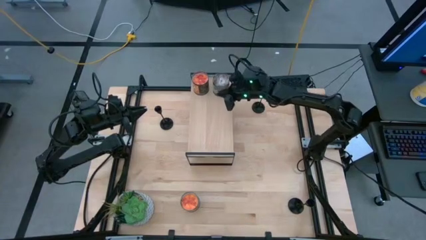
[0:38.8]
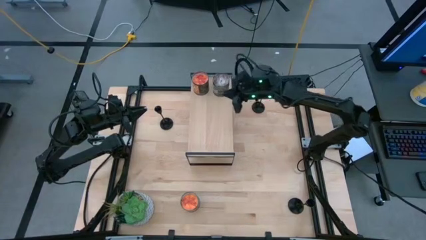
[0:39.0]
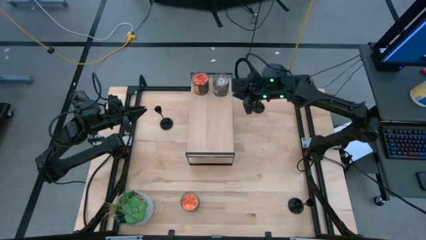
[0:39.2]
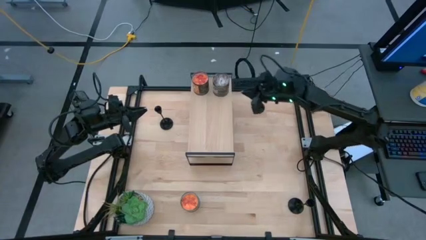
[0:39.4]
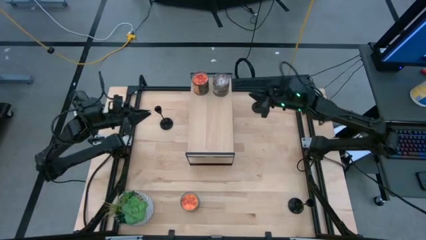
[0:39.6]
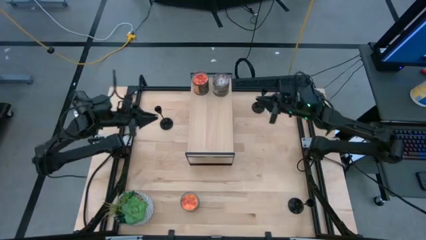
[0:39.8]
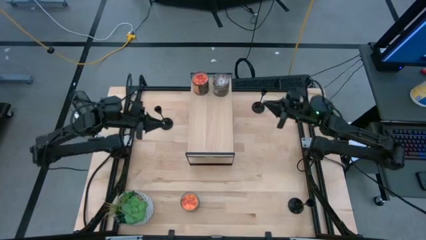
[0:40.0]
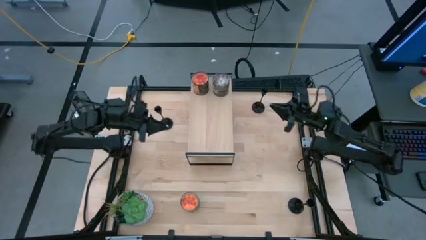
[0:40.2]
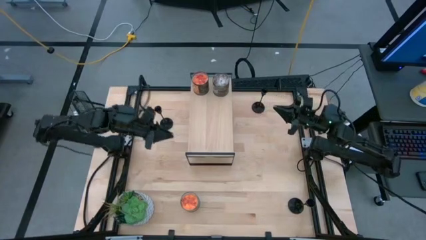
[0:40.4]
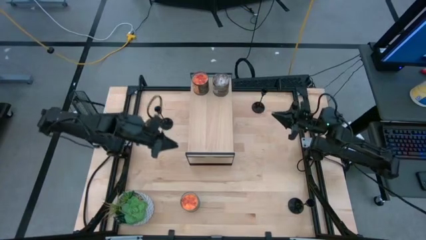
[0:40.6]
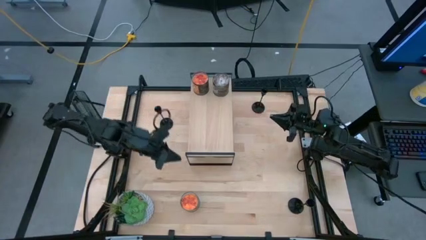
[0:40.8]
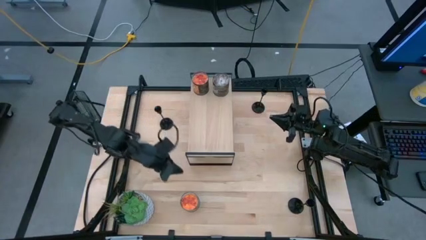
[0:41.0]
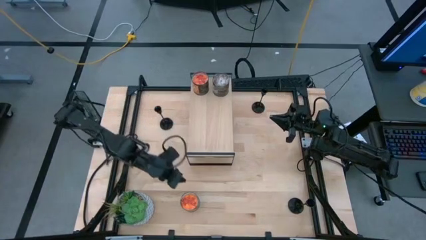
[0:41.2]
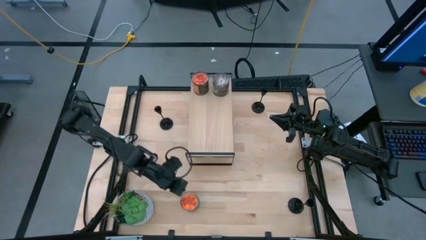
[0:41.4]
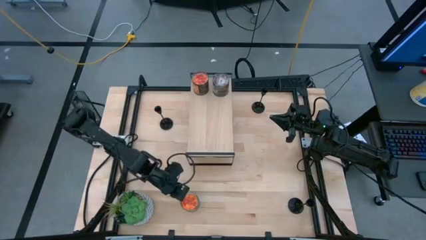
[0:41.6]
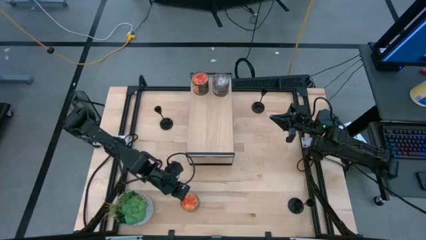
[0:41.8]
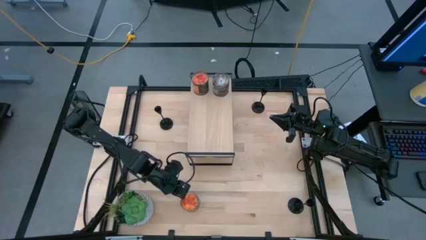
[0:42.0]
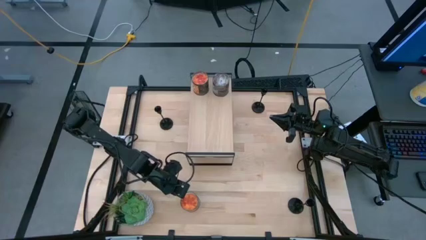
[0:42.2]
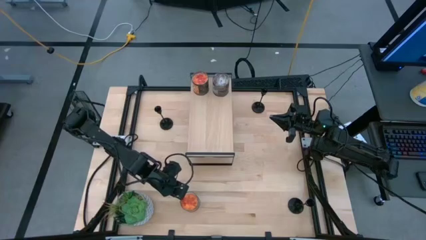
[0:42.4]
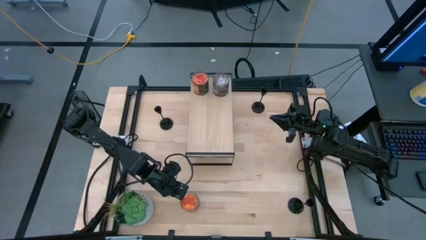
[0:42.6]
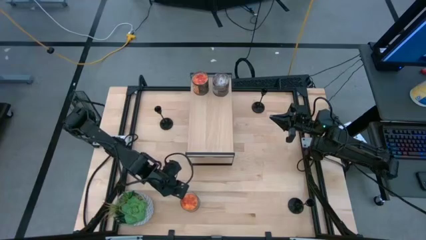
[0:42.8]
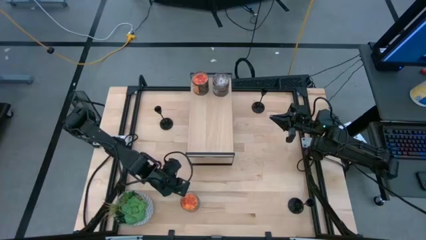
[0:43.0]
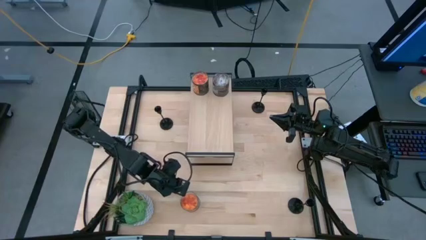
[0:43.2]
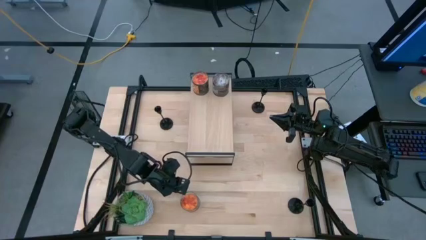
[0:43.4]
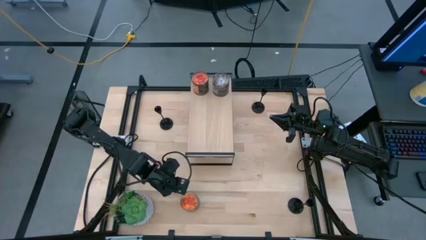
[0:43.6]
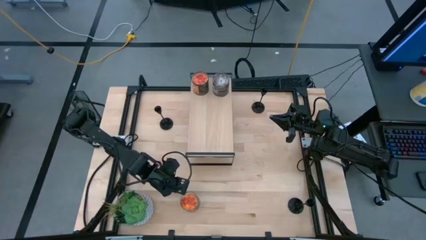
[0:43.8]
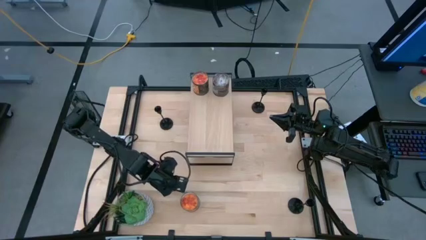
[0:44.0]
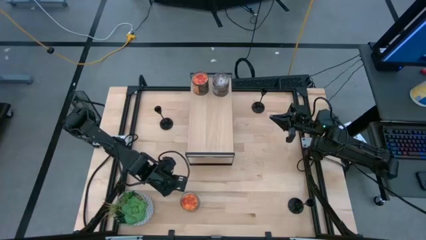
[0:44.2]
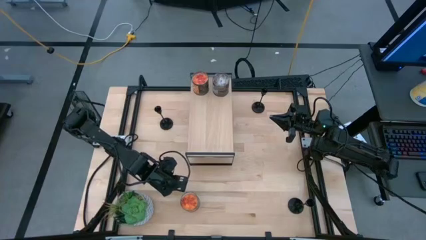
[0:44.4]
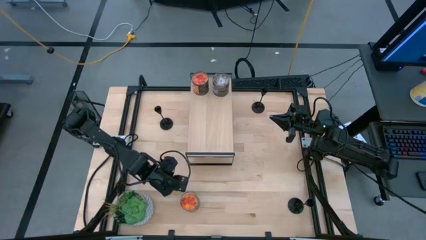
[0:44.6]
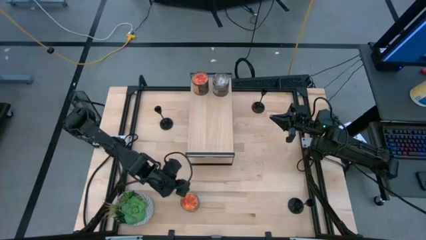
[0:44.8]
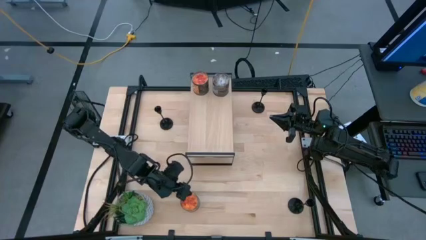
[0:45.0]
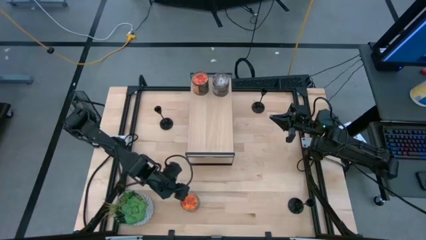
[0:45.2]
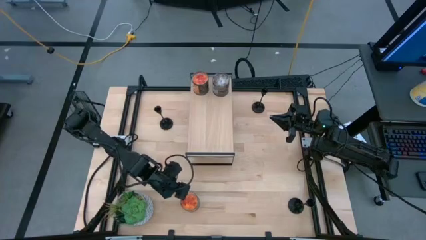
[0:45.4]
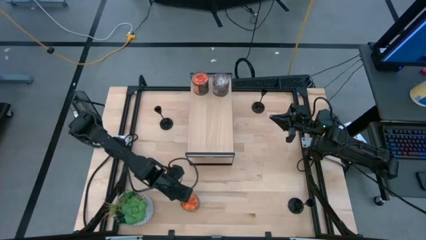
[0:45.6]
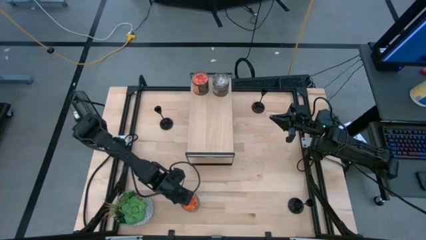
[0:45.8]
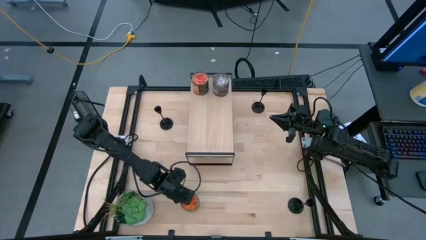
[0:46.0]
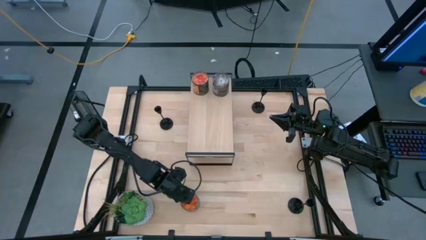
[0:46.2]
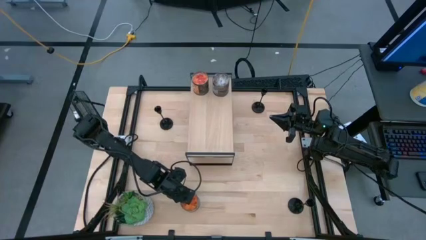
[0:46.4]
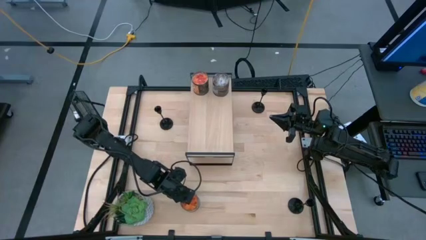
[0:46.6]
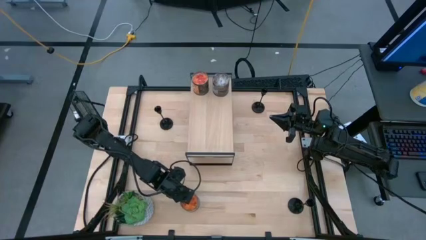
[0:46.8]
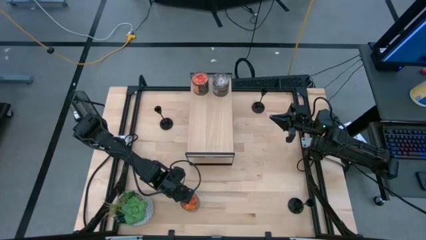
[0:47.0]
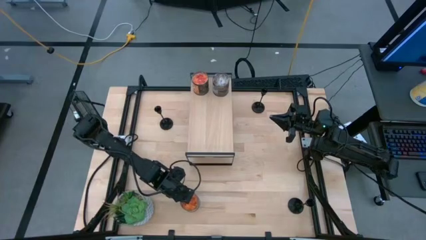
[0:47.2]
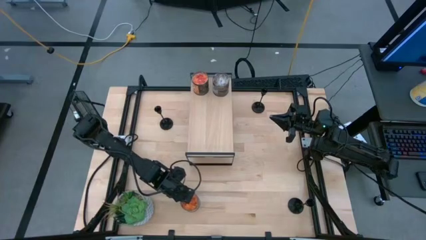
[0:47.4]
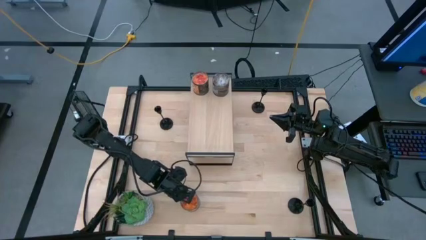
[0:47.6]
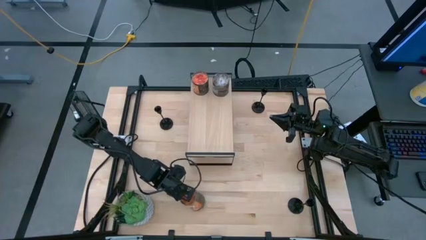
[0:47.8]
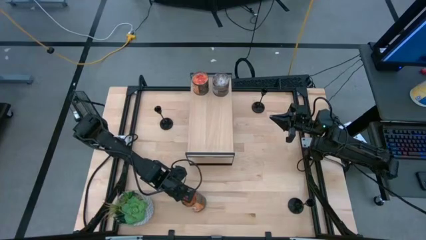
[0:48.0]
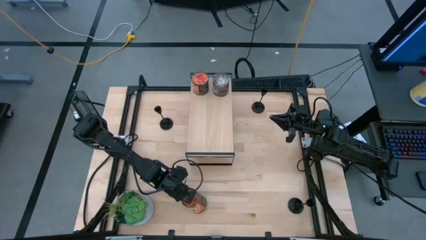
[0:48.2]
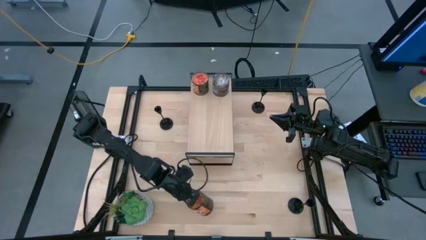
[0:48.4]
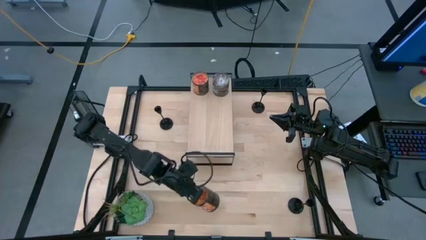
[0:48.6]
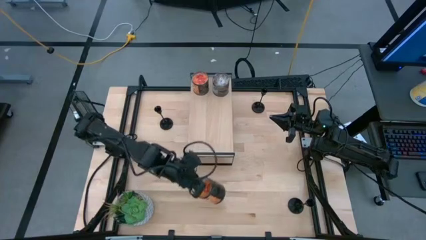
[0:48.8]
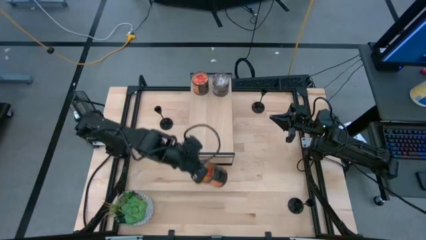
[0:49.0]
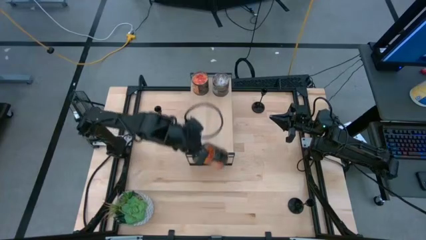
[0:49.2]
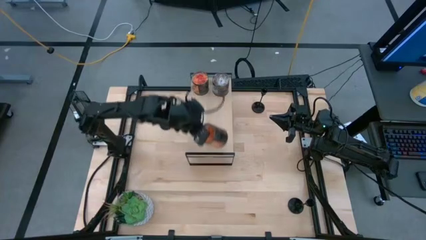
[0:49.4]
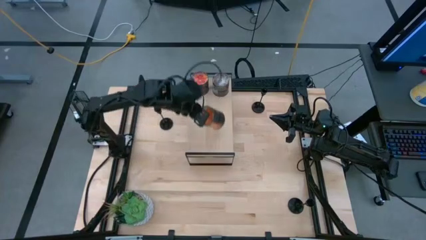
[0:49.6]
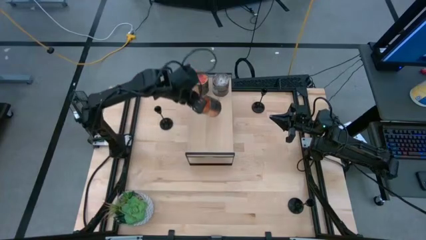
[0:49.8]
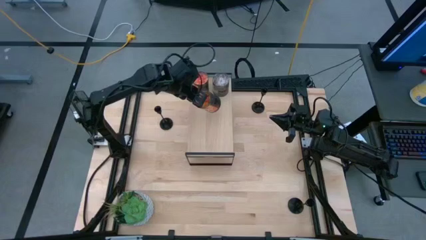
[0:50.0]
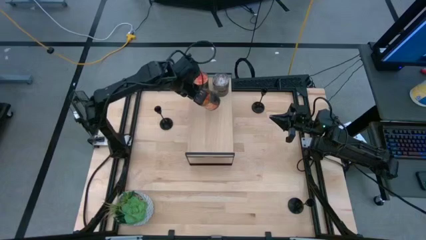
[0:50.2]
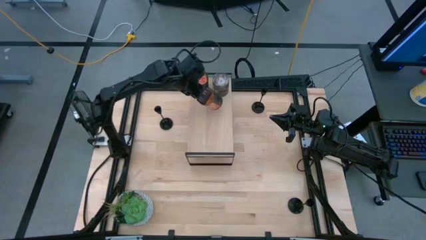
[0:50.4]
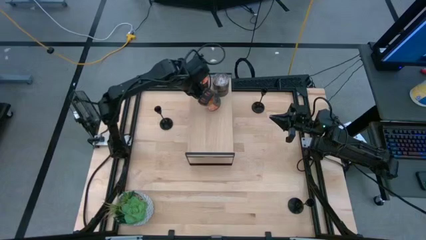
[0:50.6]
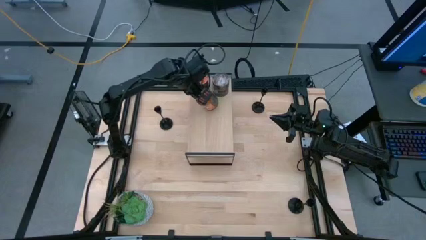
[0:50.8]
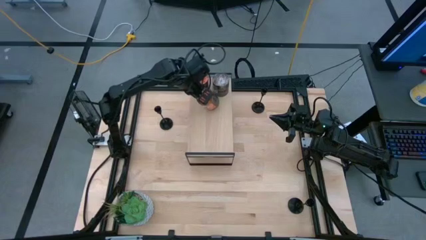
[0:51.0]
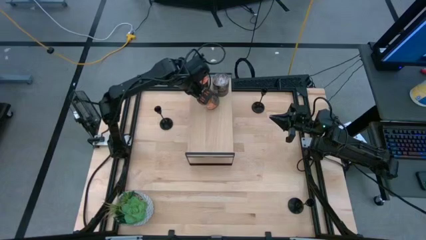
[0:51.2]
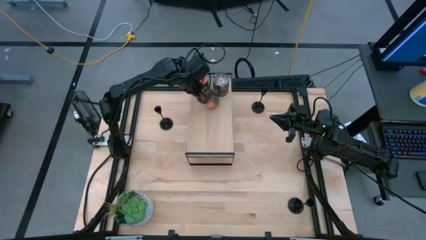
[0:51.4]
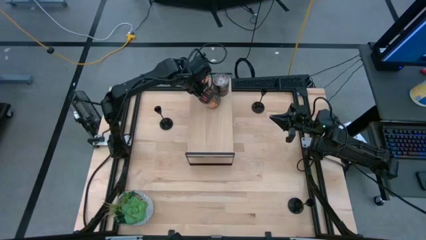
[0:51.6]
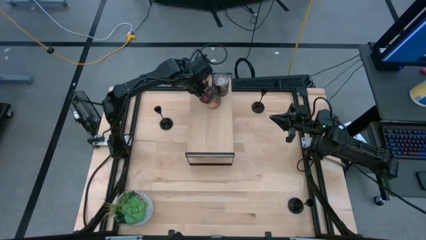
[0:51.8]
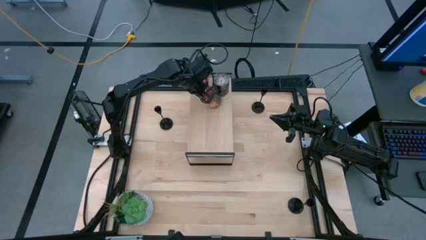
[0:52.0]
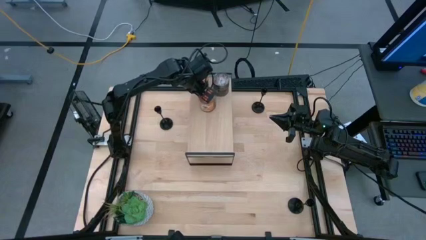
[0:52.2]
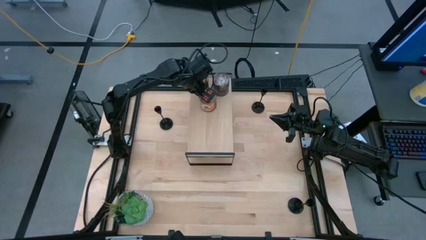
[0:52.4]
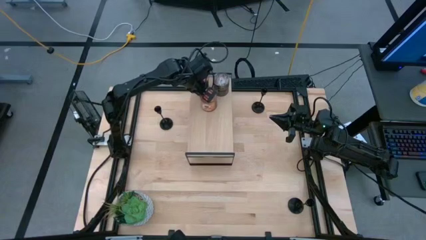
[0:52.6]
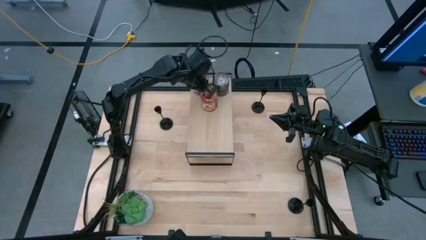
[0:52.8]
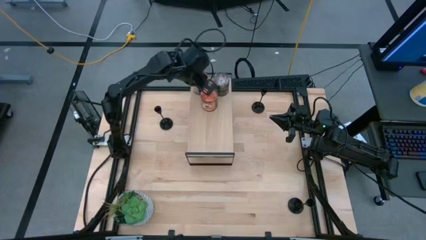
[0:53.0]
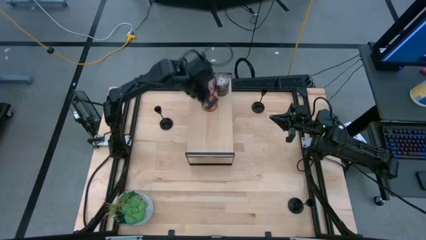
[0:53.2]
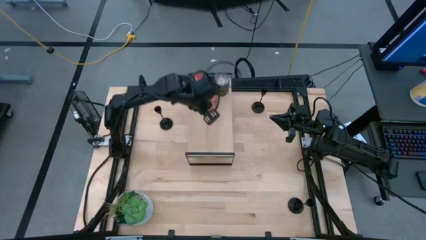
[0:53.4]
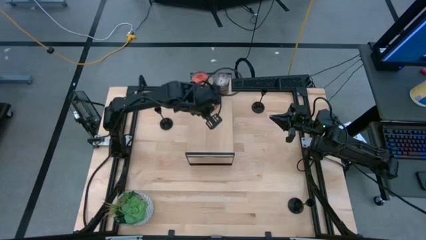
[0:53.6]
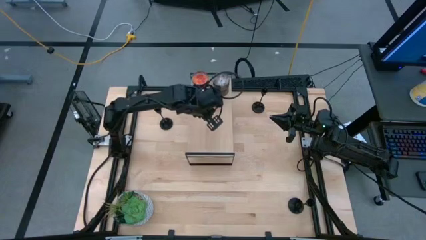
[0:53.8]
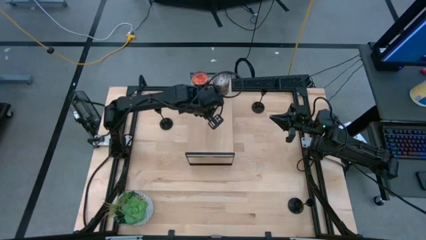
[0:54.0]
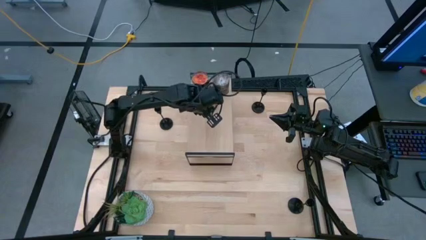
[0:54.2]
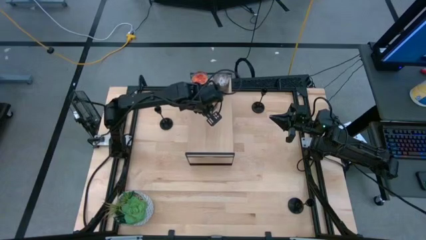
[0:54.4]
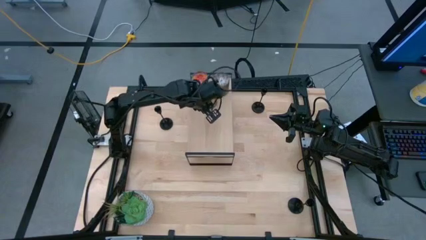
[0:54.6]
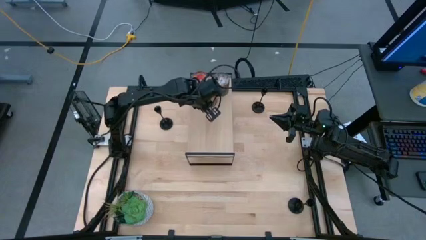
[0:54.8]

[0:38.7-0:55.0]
Task: Pick & Place candle stick holders
Put the orange scented candle on the shelf

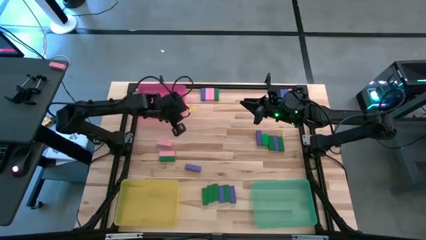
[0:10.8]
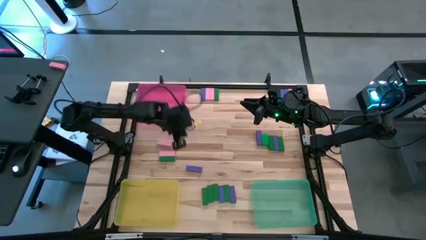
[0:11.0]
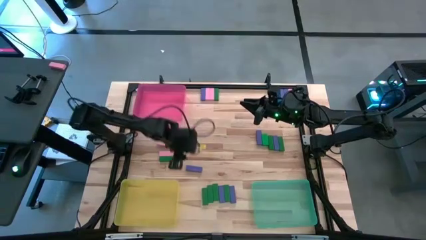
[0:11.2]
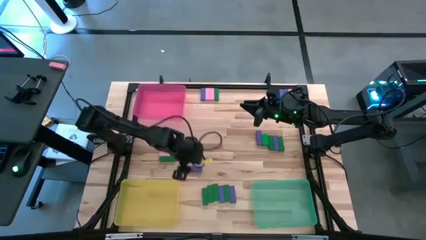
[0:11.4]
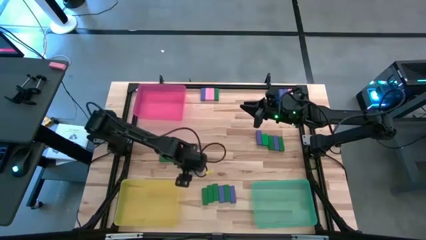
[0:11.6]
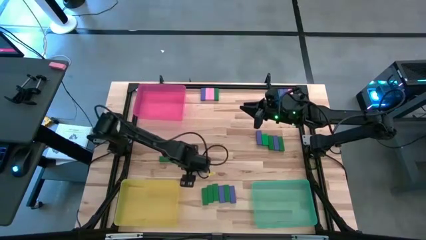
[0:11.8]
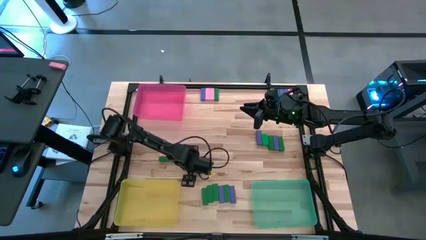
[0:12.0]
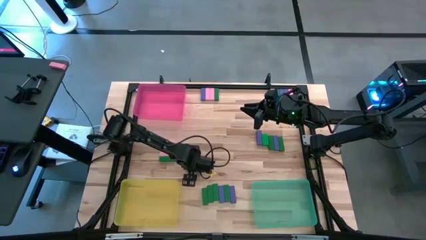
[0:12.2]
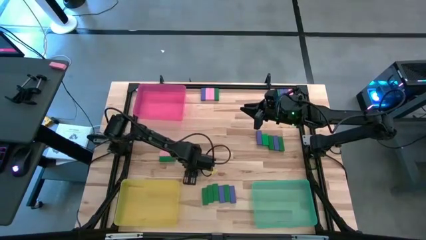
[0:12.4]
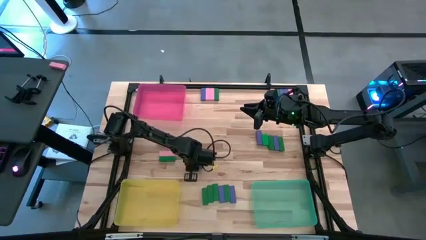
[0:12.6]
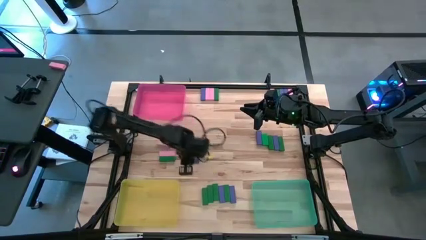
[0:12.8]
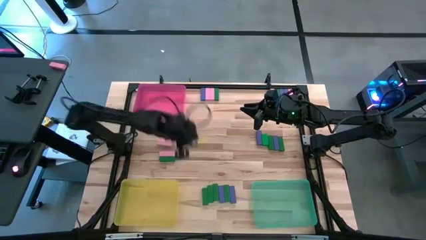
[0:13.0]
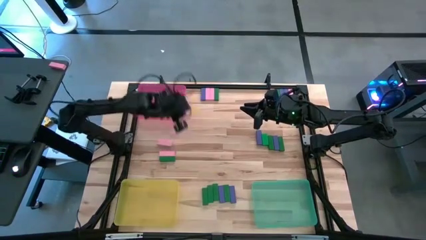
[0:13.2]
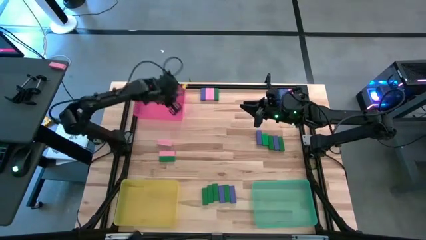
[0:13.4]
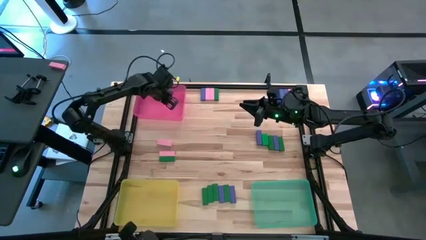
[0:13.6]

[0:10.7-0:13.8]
Task: Sort blocks
Put the violet block into the pink bin
